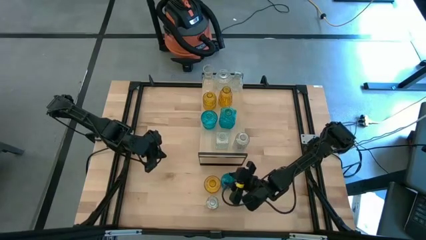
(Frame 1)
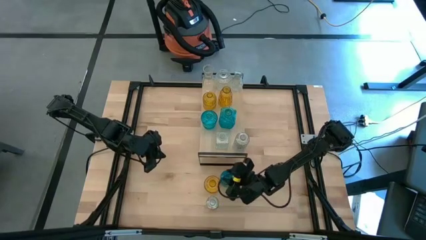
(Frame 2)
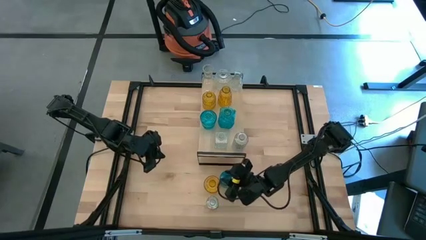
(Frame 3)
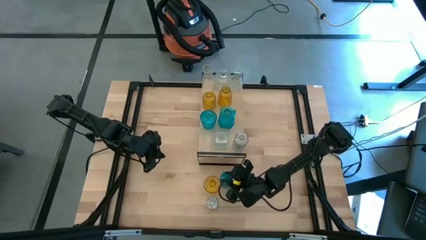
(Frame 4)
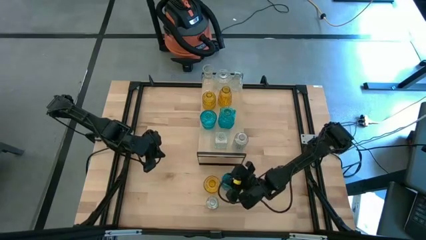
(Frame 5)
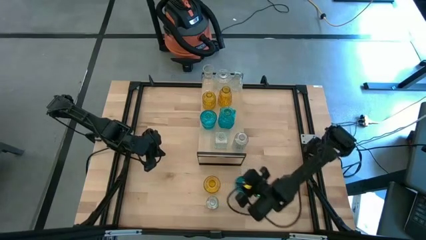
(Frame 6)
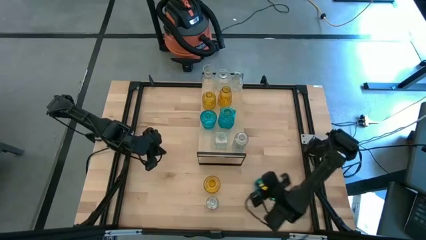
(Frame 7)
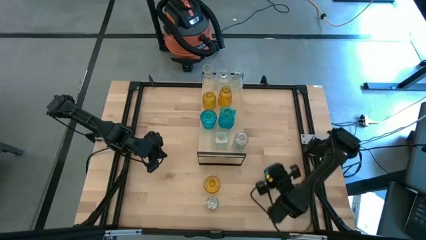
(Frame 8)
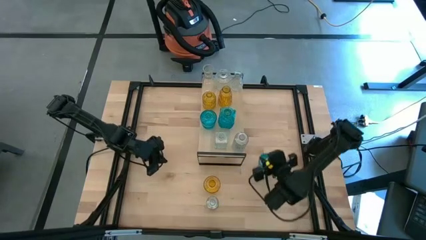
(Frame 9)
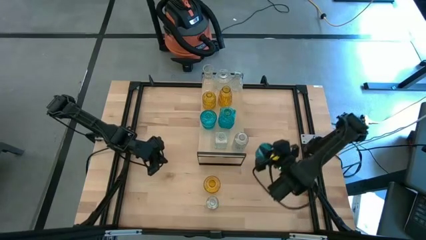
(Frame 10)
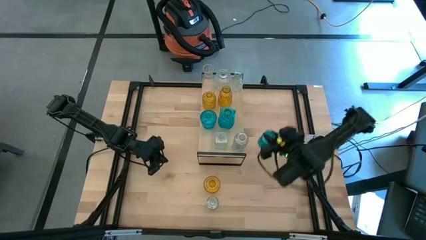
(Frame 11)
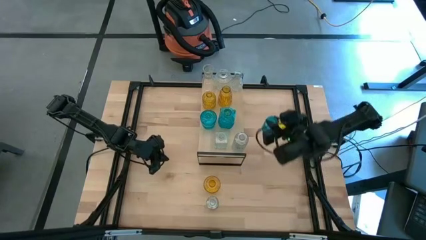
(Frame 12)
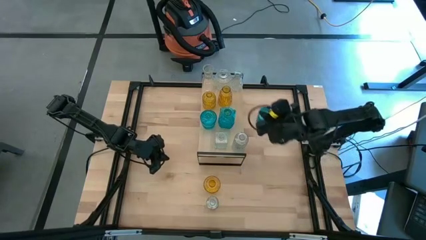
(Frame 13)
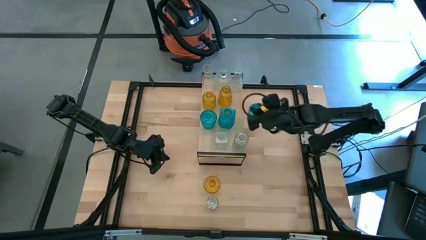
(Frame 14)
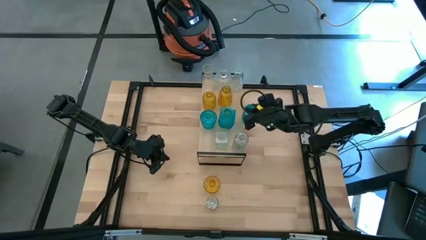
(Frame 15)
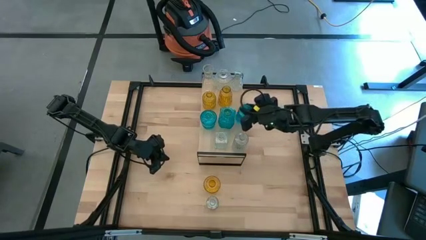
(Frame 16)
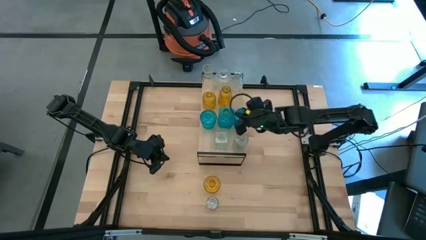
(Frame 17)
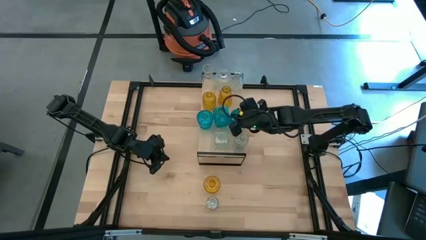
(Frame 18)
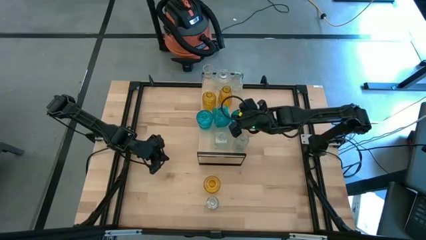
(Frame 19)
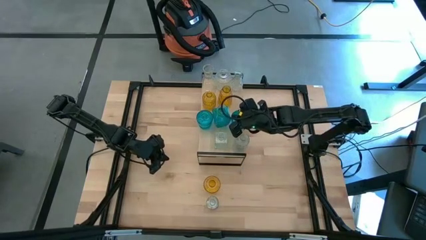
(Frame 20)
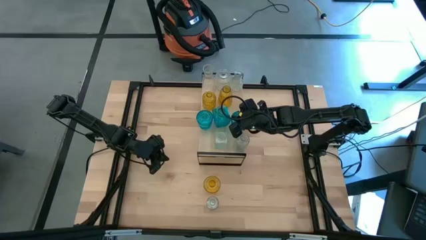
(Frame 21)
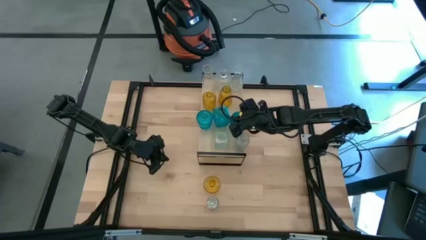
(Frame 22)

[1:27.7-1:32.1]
Task: sort vases onto shelf
Put the blue vase on the shelf aligned with the other blue vases

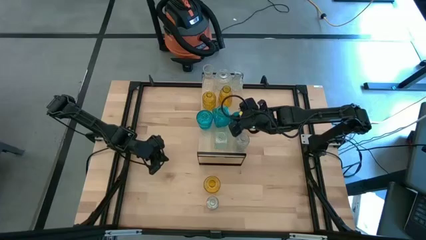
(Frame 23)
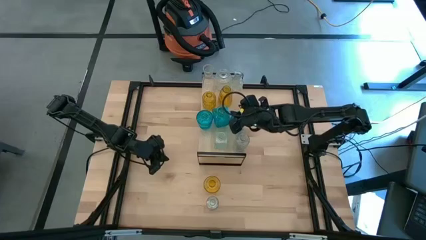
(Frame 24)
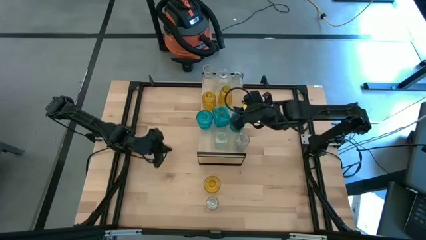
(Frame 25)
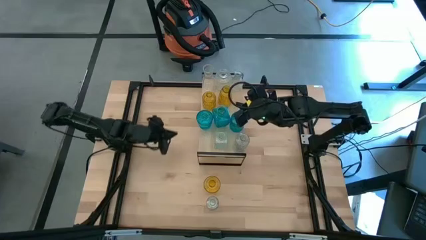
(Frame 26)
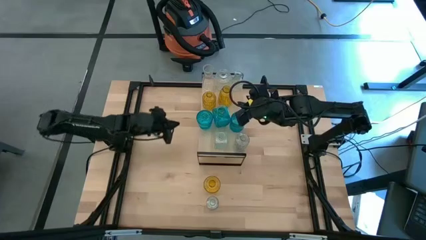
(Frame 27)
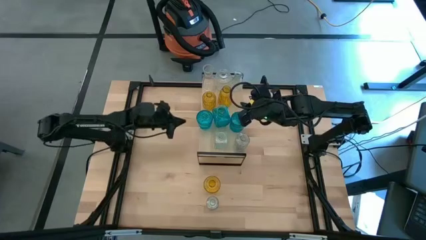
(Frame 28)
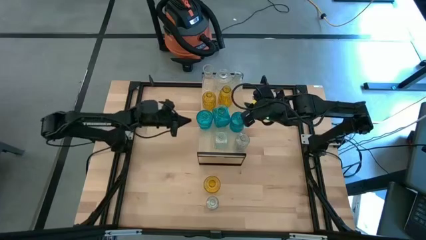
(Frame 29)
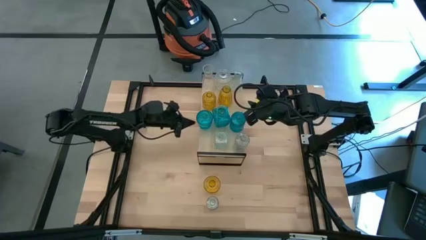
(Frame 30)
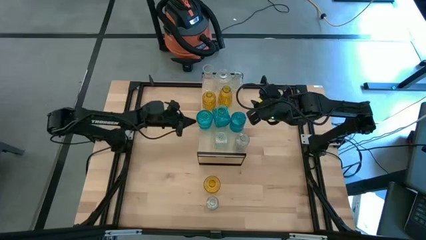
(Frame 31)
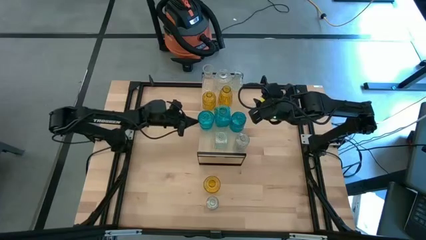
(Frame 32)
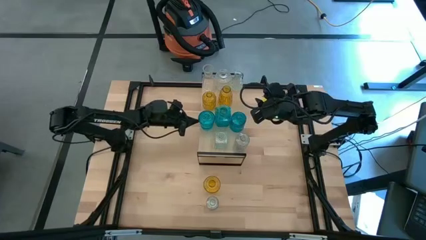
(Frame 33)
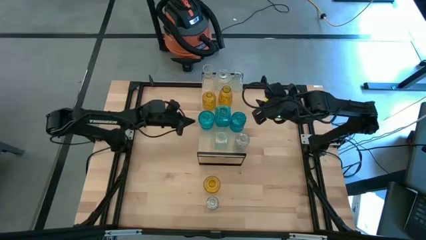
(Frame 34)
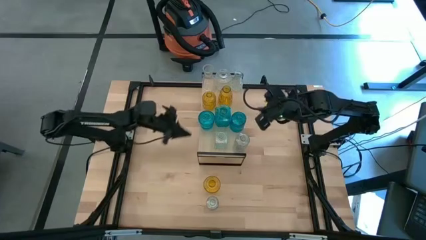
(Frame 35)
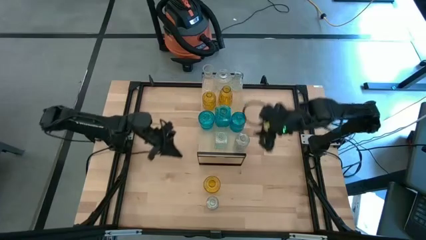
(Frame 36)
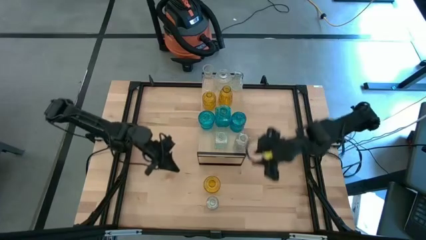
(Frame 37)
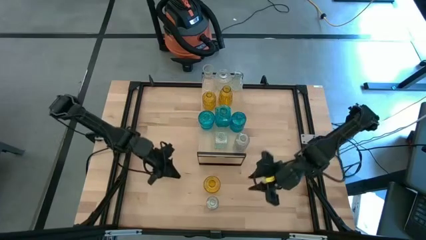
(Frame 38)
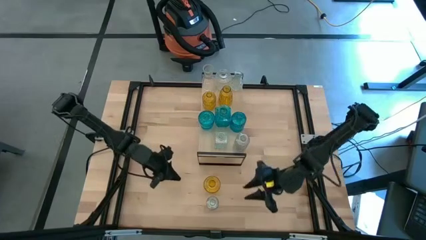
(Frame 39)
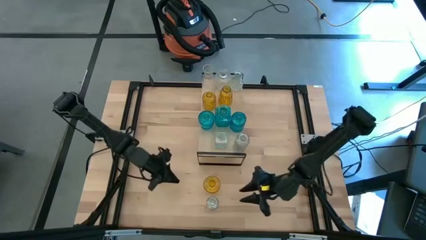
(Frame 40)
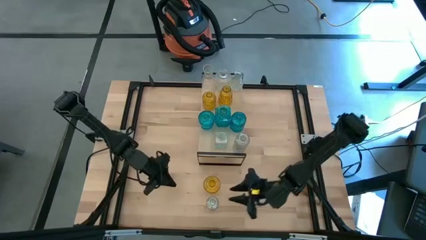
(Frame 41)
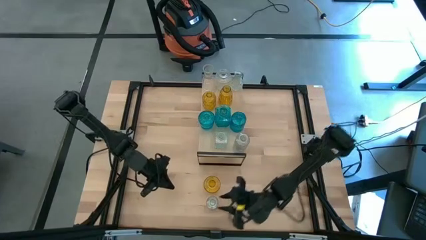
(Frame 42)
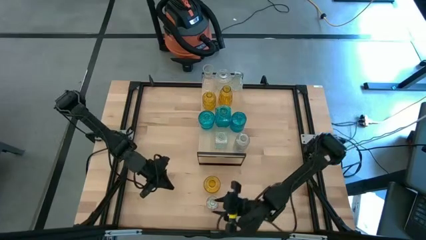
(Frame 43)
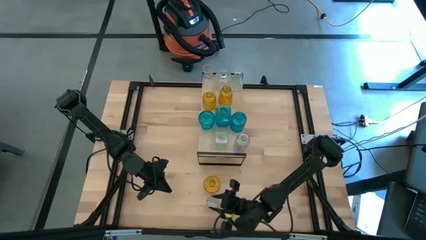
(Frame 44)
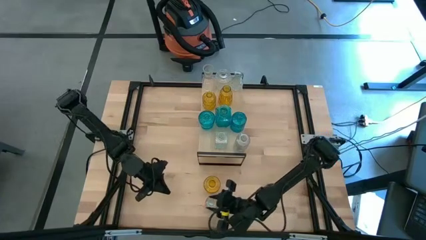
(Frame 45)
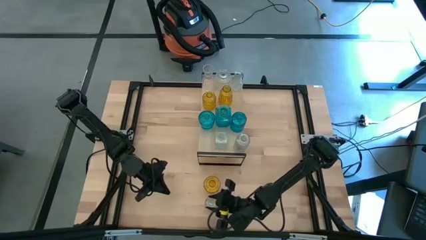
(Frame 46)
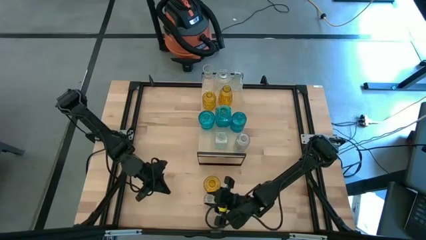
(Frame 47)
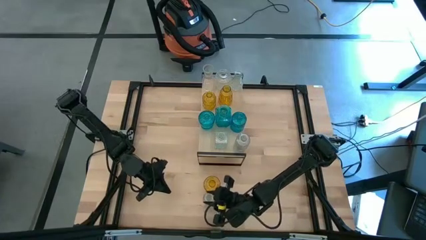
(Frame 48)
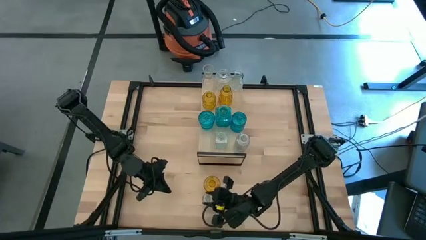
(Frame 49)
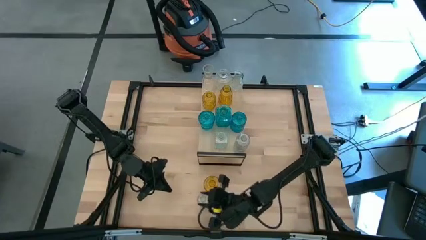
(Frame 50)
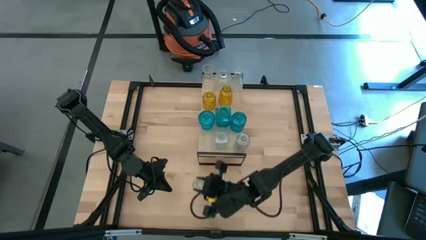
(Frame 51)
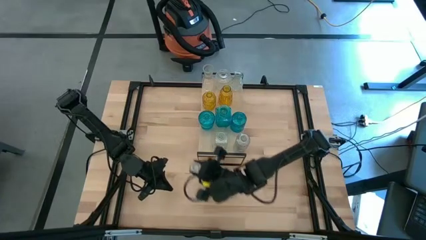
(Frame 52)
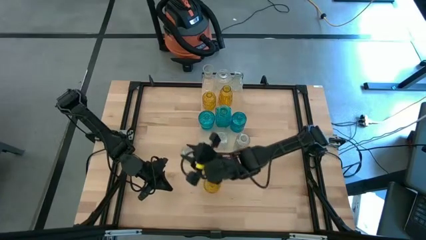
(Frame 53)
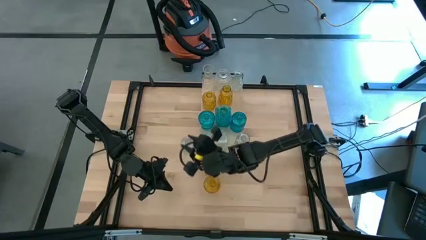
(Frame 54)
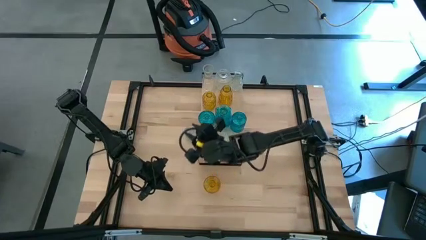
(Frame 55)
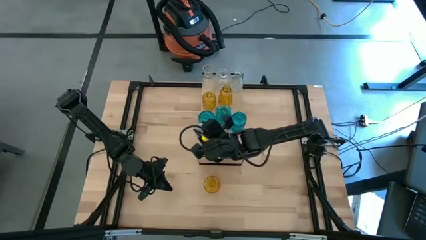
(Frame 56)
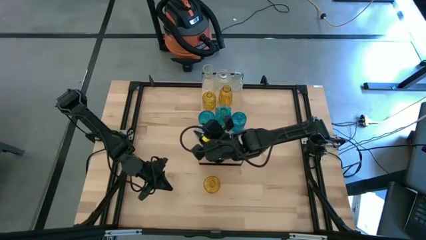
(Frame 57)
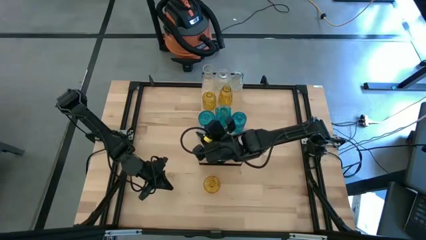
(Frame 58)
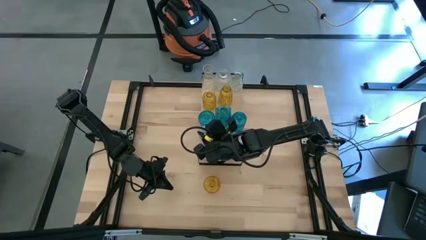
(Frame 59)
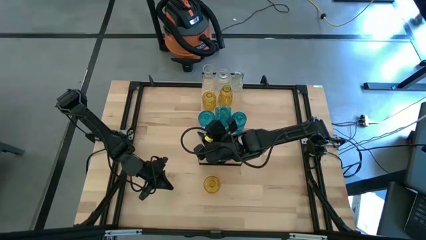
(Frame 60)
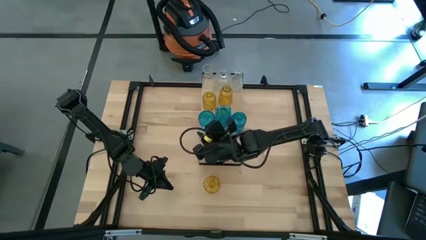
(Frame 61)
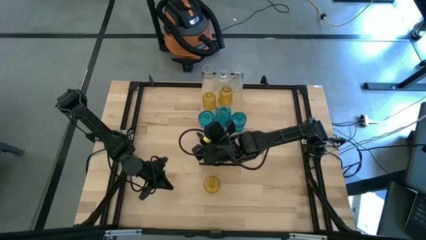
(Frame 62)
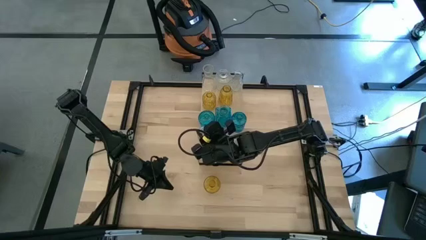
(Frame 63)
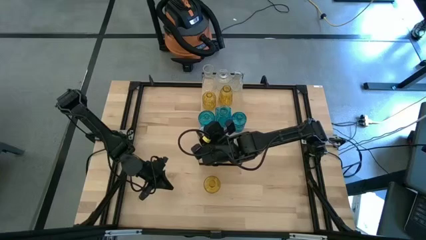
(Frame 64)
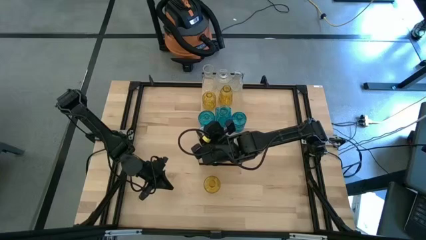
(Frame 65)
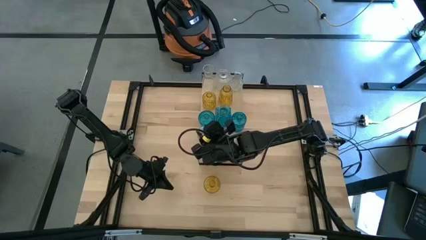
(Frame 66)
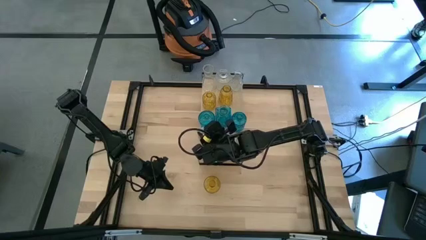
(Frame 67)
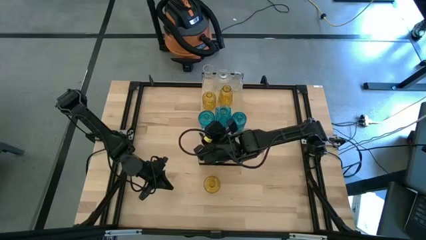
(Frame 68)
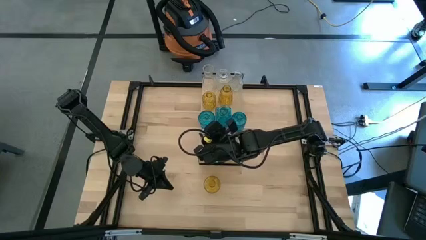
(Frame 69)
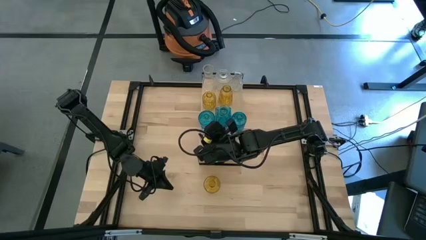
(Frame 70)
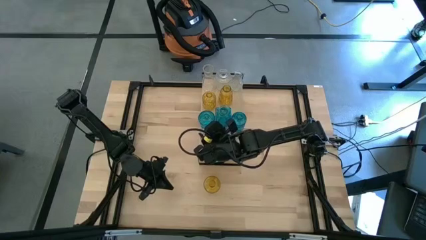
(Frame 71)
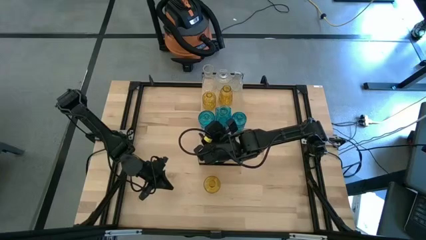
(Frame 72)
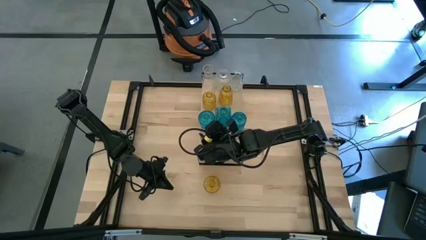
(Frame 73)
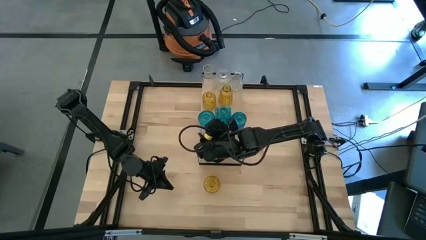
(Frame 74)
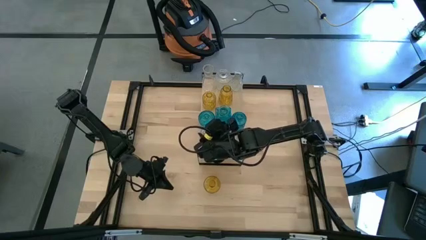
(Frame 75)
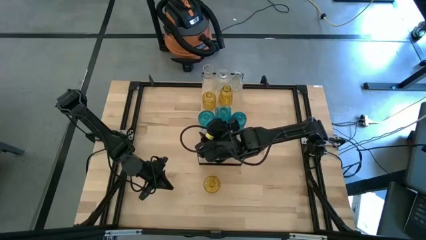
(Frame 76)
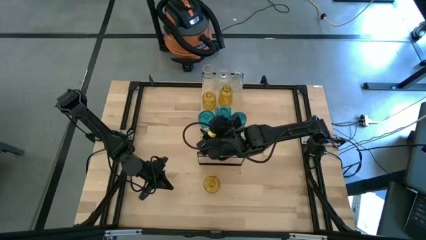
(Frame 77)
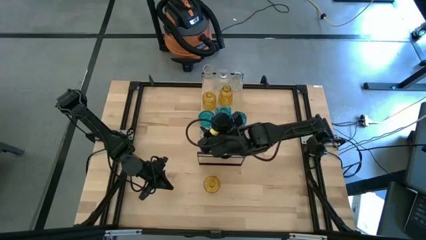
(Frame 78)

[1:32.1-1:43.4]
Put the transparent vase on the shelf aligned with the other transparent vases

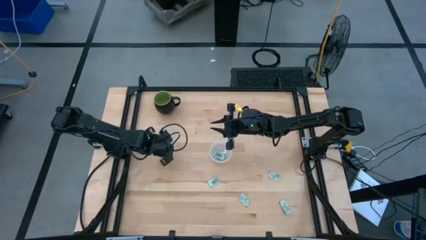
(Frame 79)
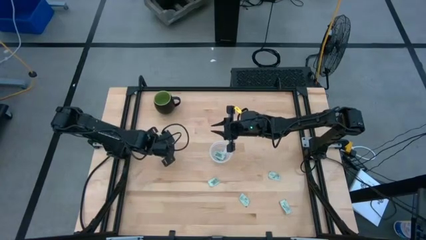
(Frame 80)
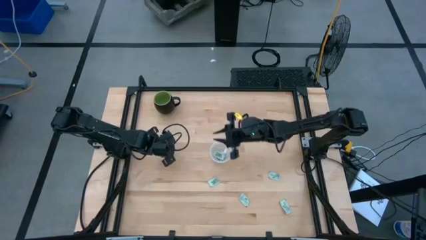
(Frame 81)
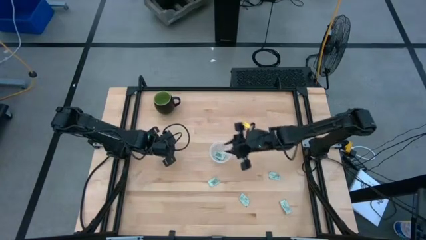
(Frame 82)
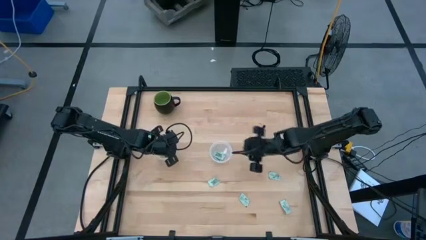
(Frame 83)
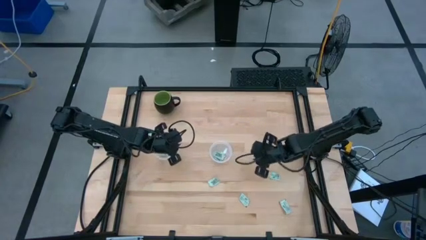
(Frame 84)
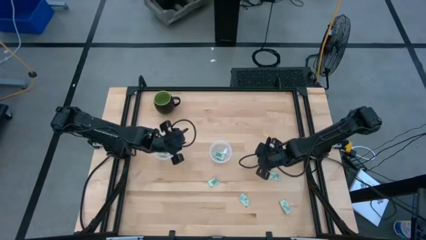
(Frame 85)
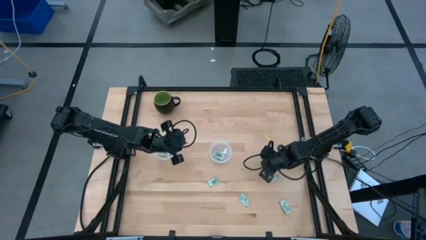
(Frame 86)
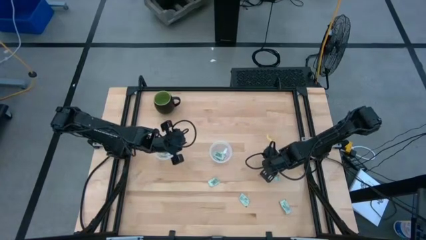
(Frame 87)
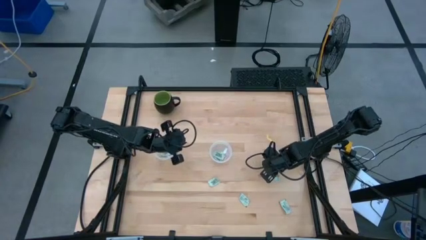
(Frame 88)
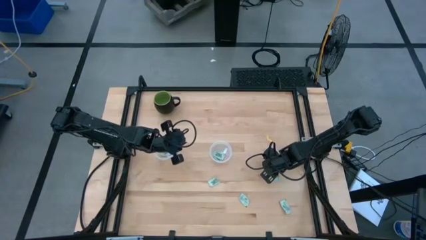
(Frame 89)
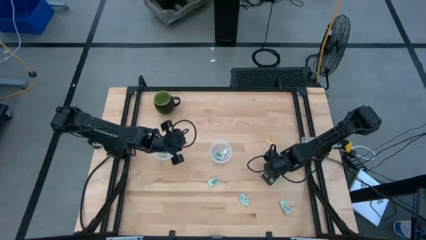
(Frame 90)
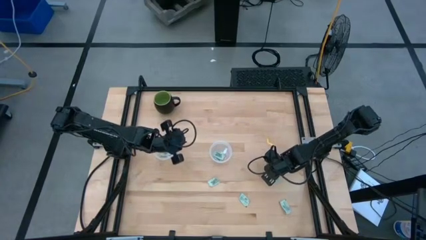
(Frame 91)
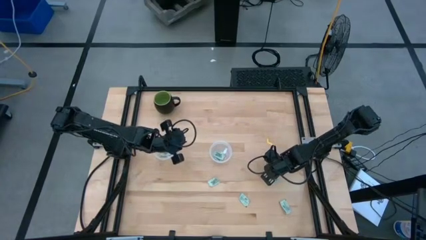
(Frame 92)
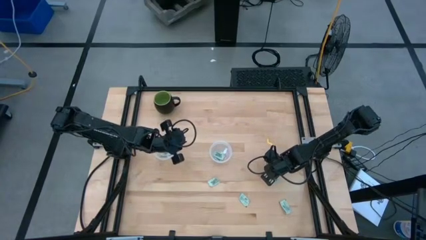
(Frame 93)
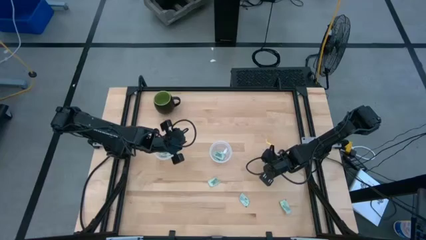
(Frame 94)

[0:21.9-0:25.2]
Task: Pick and place Stevia / Truvia into bins
Put the white stevia packet into the right transparent container
